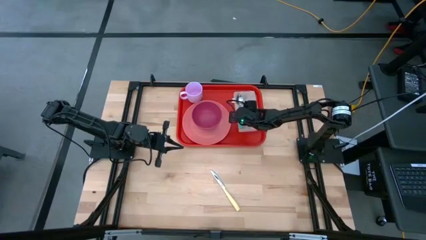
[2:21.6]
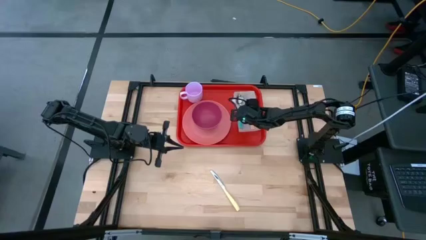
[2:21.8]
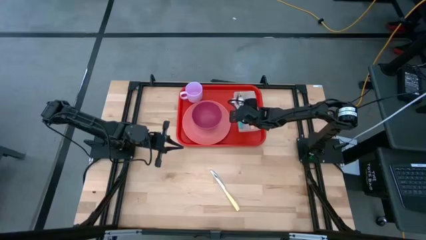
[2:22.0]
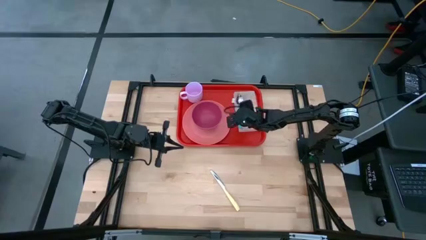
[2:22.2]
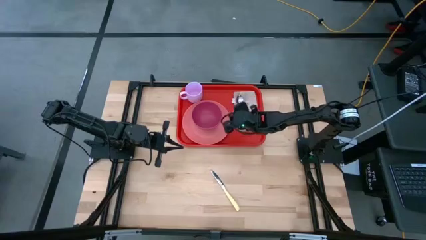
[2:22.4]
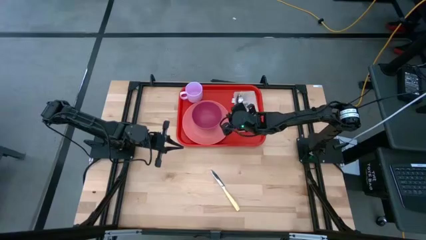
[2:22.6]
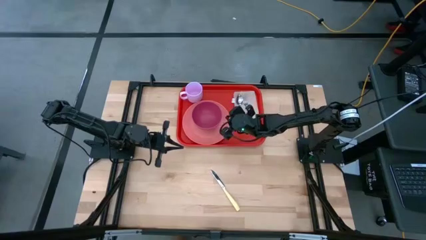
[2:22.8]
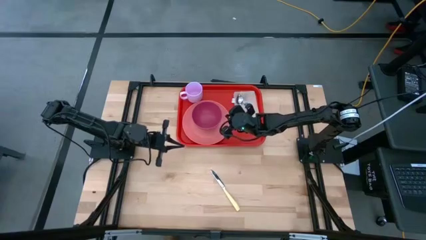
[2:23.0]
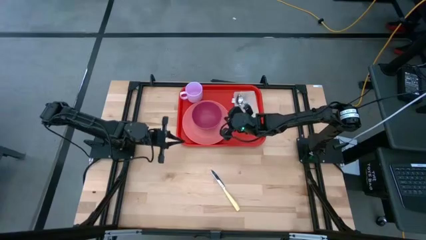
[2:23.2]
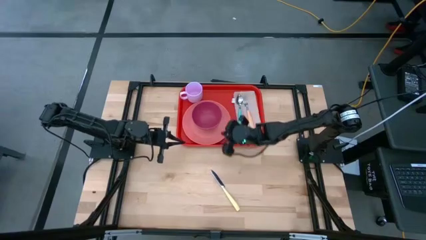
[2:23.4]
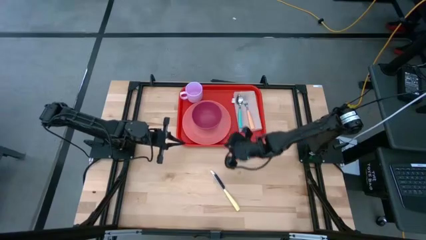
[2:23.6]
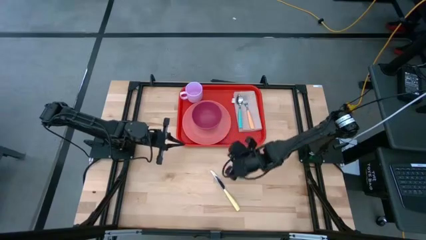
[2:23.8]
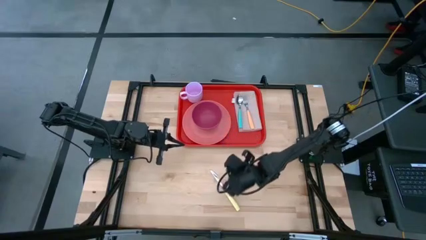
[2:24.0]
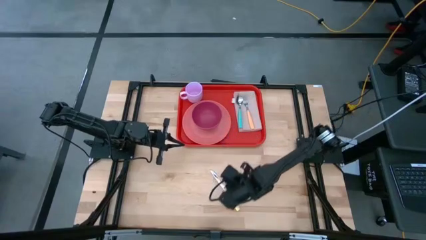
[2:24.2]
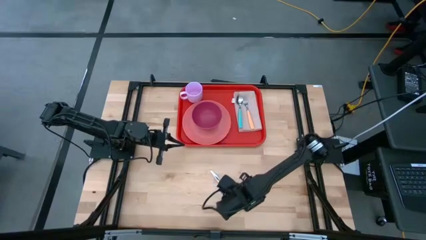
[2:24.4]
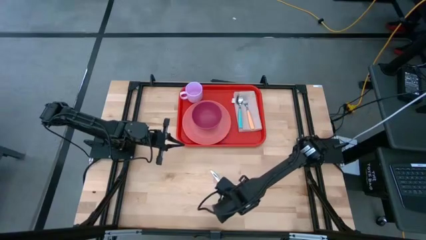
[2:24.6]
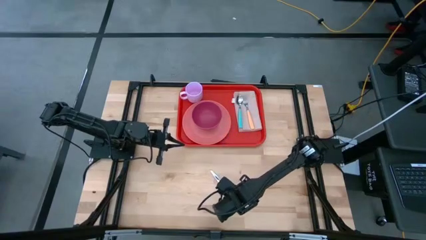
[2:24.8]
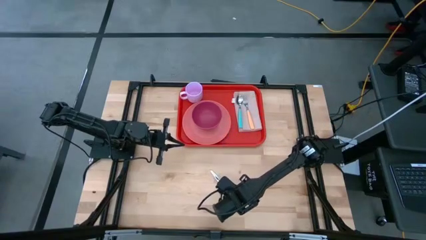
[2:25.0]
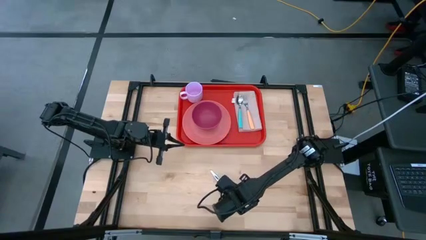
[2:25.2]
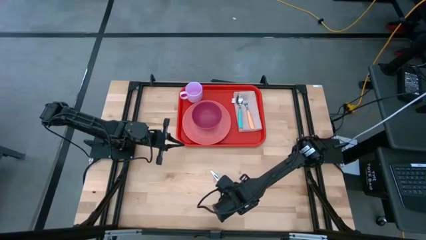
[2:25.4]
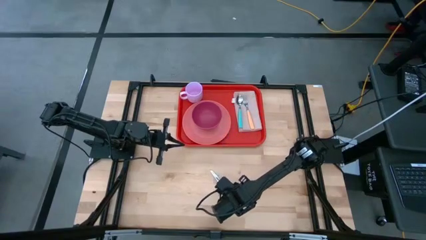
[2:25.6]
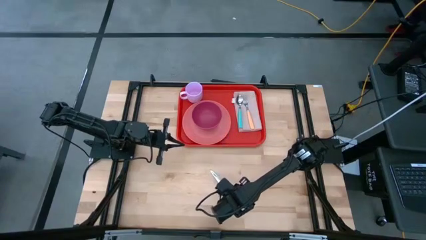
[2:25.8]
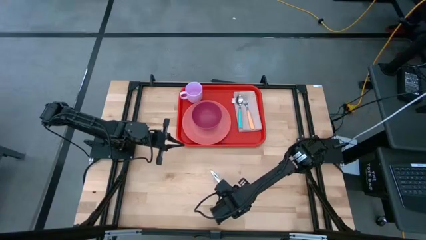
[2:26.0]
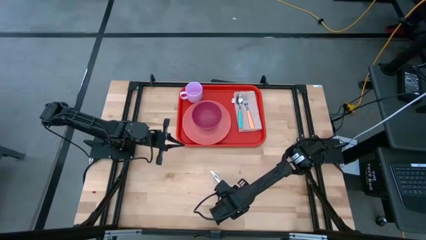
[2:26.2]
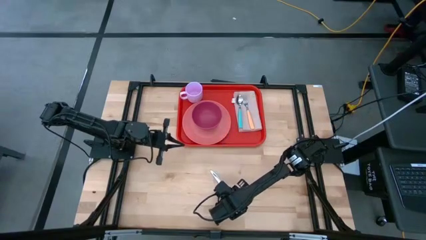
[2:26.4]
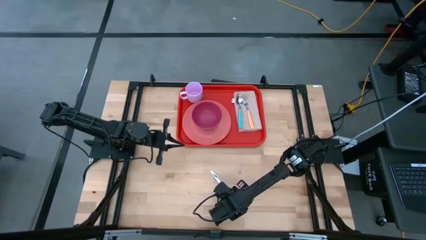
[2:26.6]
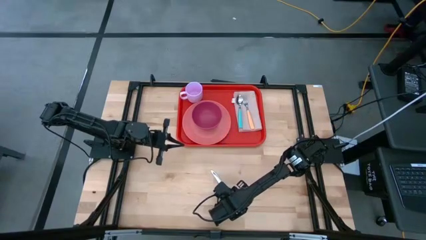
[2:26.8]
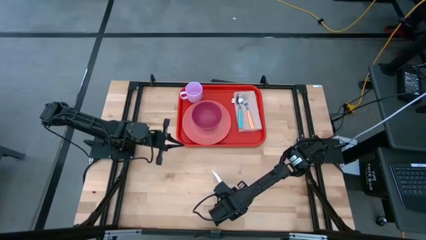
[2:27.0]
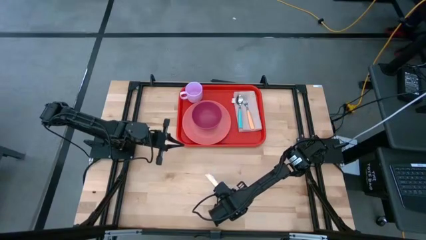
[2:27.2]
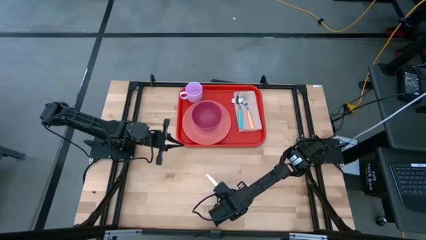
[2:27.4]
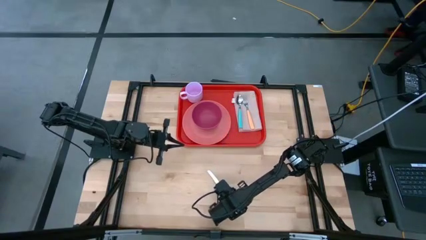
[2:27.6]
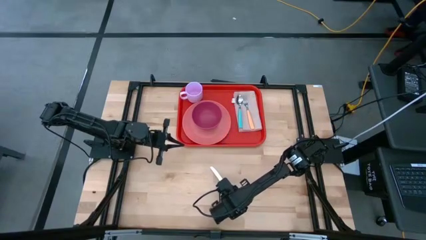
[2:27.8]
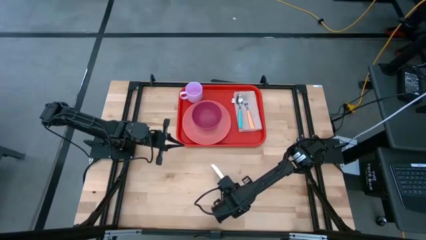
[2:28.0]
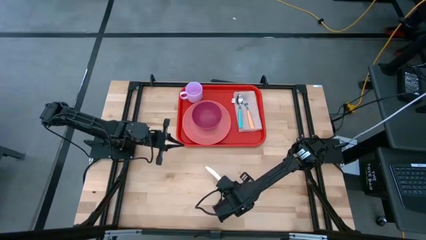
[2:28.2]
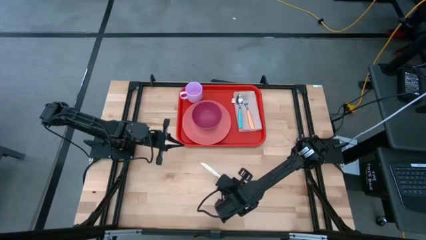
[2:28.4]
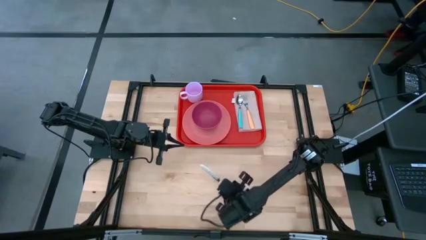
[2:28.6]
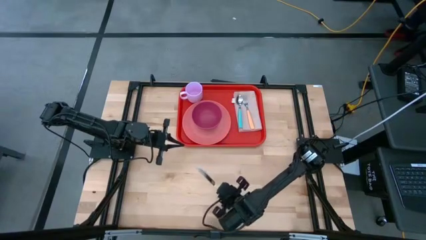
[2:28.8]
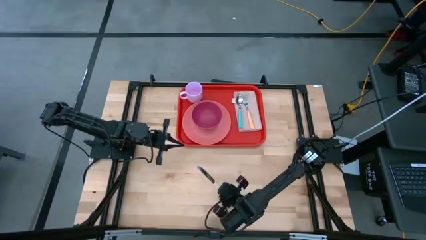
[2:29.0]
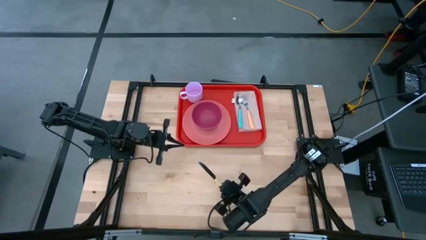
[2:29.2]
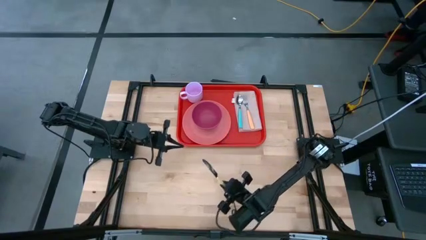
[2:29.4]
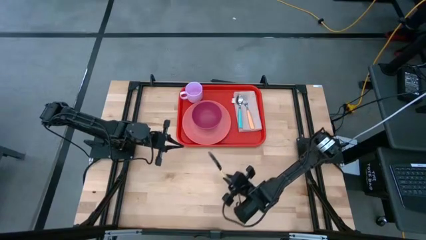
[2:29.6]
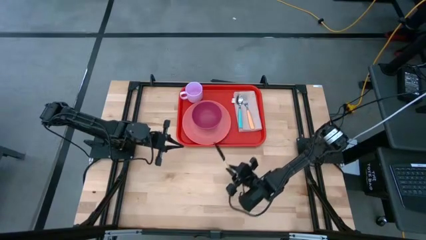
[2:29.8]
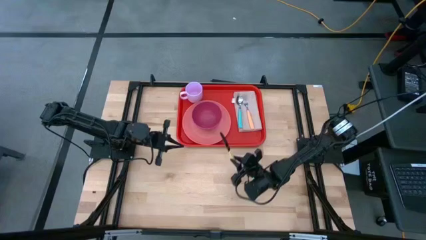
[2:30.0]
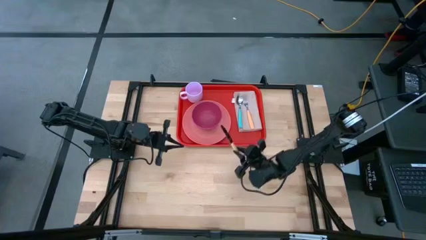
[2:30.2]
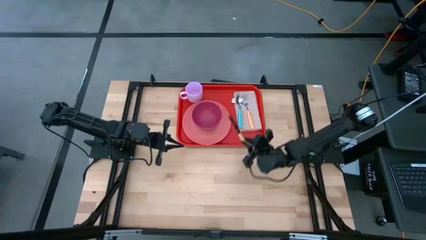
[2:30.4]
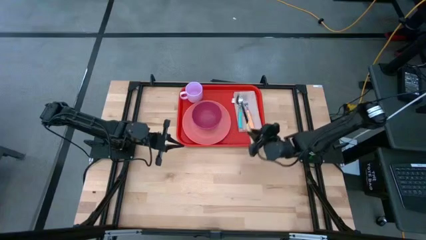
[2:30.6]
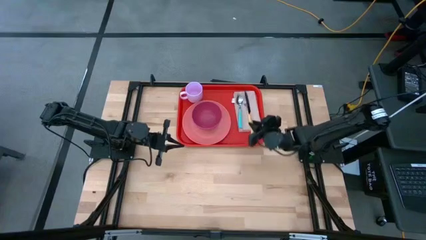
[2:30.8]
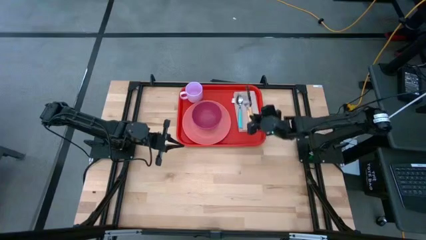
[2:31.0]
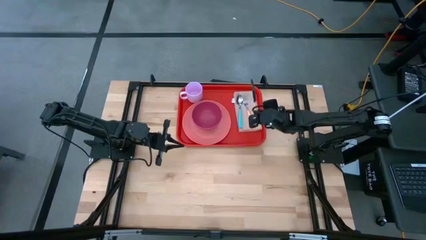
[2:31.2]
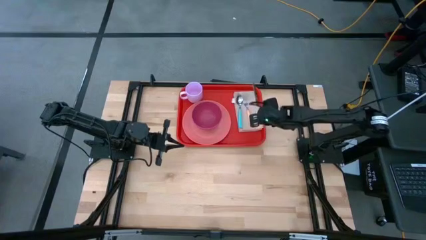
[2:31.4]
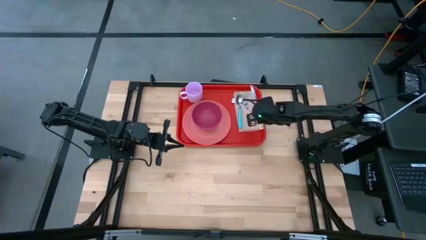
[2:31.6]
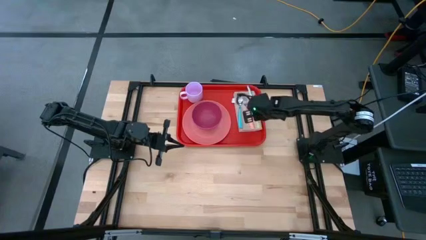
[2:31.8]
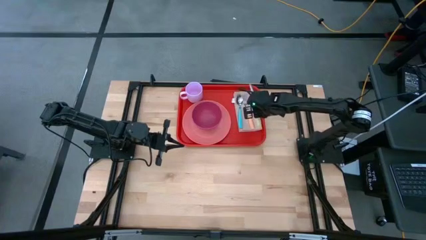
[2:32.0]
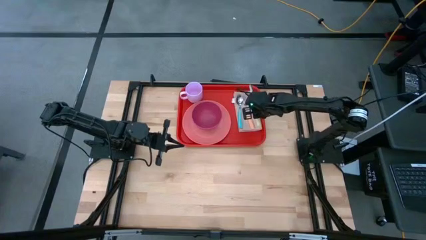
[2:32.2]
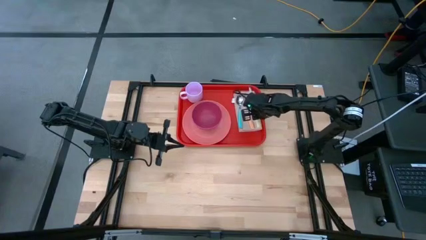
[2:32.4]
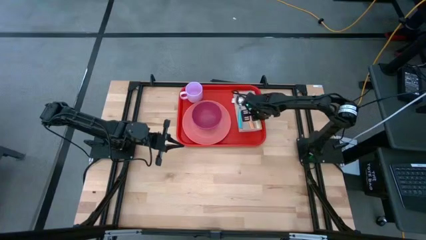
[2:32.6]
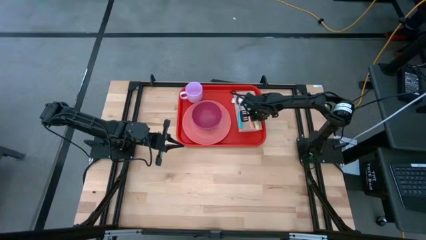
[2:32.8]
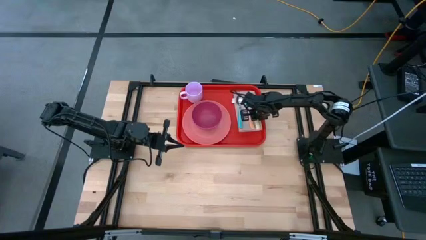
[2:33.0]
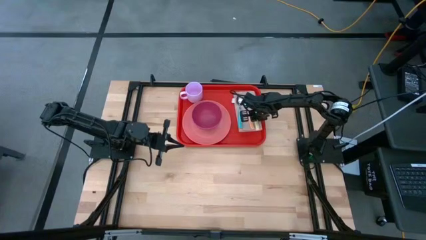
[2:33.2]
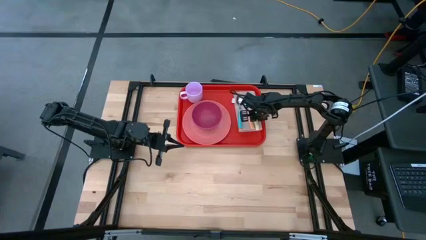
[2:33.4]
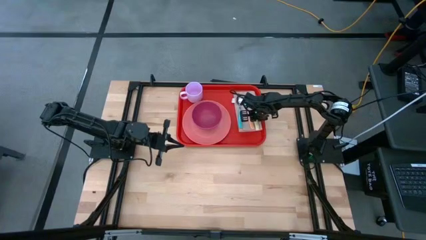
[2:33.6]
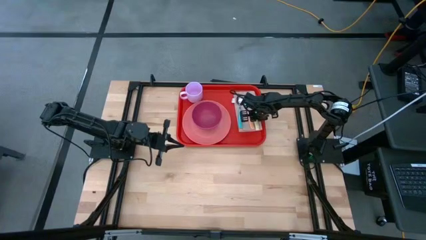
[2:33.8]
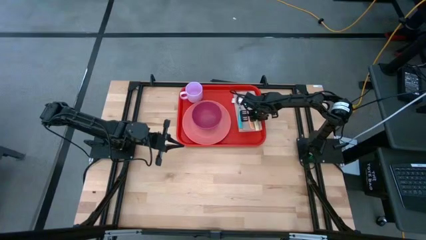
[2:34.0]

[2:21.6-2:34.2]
Task: Set up tray
Put the yellow dinner knife to the right side of the orange fork on the light brown table napkin on the red tray
